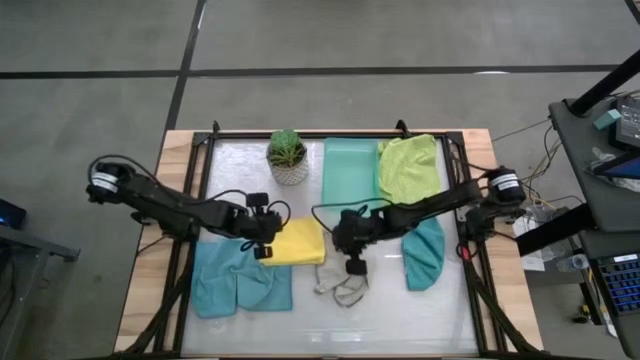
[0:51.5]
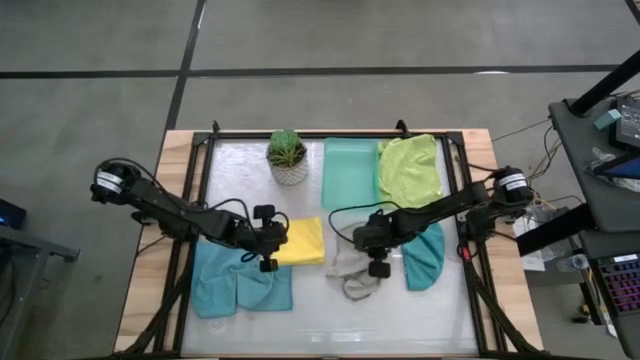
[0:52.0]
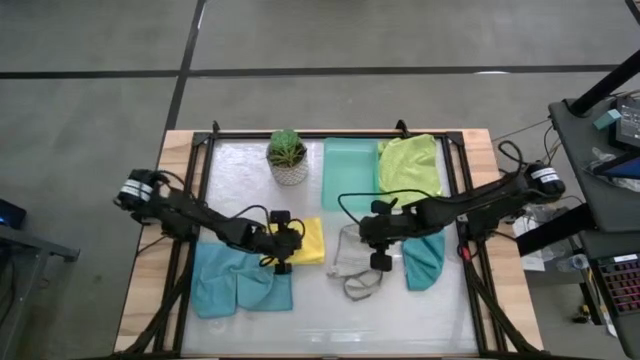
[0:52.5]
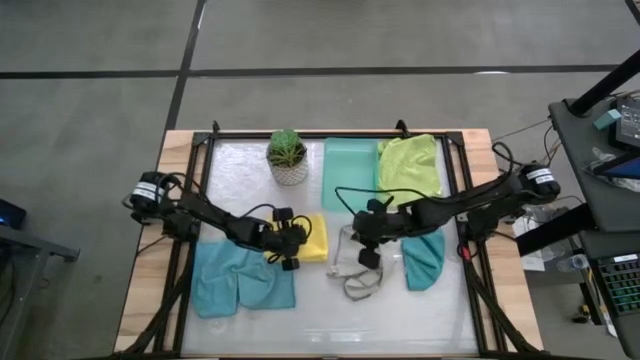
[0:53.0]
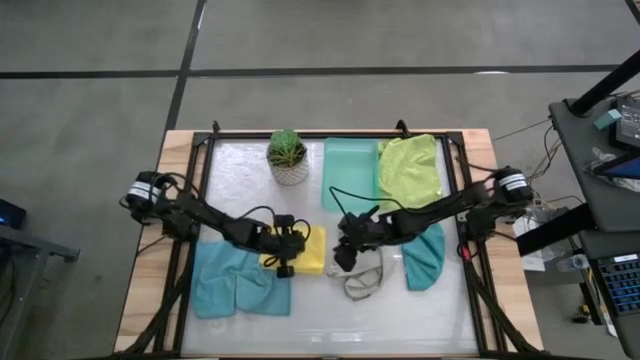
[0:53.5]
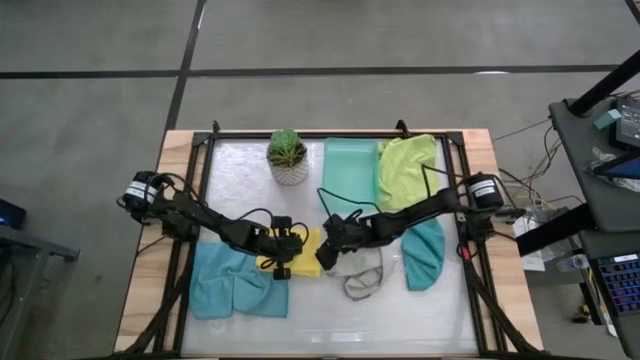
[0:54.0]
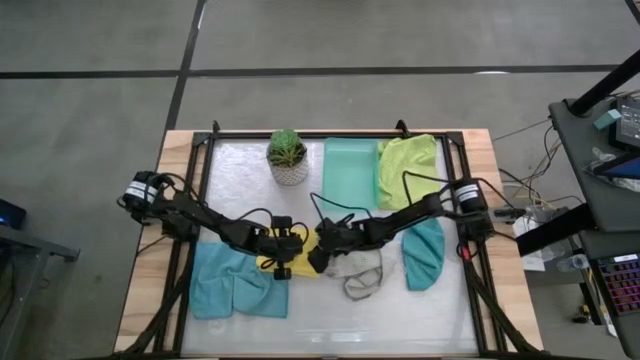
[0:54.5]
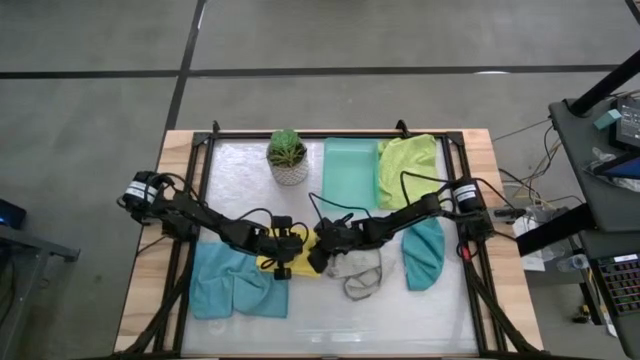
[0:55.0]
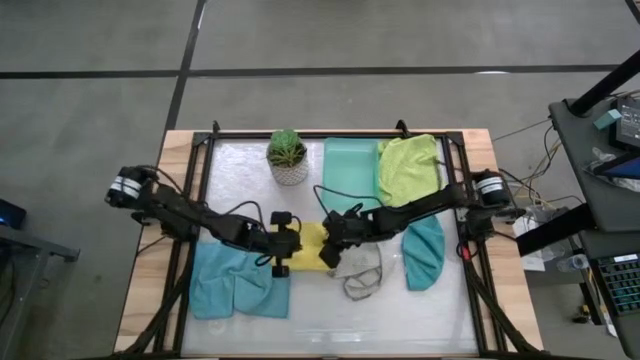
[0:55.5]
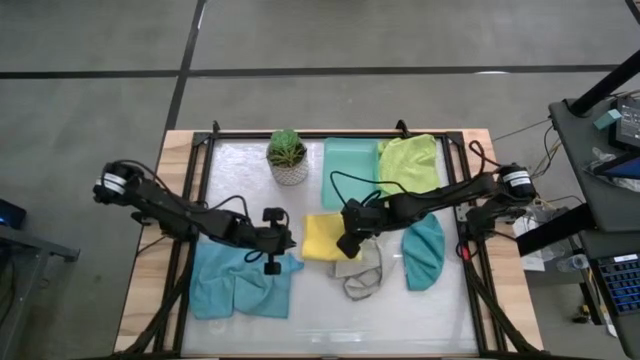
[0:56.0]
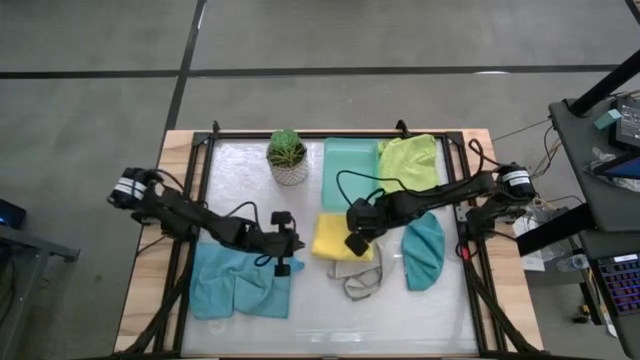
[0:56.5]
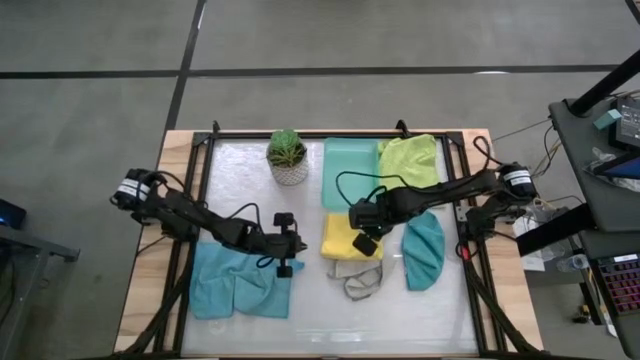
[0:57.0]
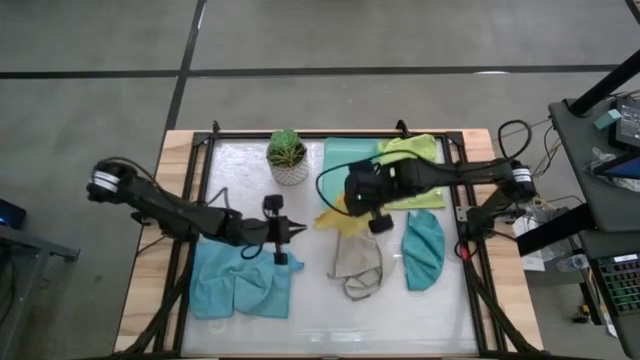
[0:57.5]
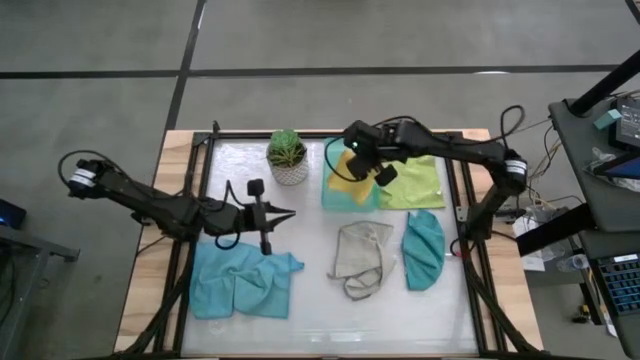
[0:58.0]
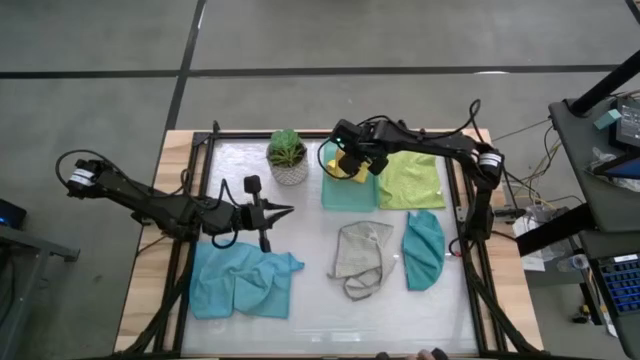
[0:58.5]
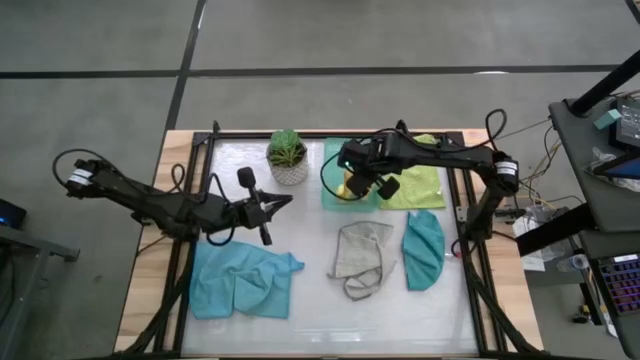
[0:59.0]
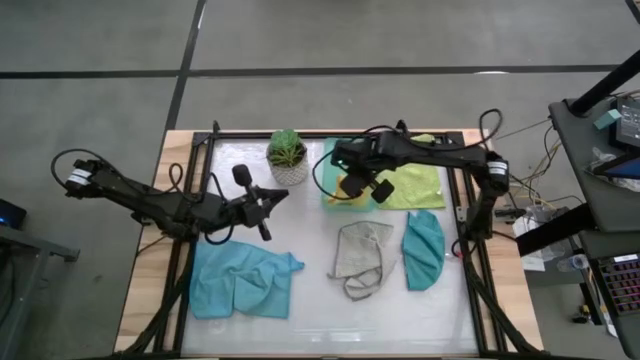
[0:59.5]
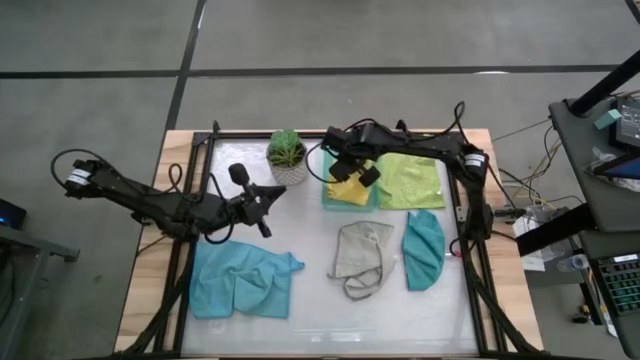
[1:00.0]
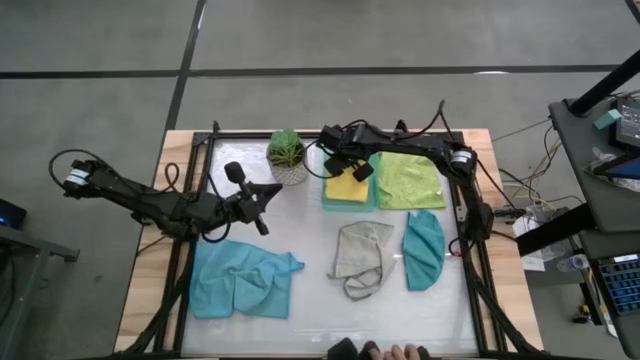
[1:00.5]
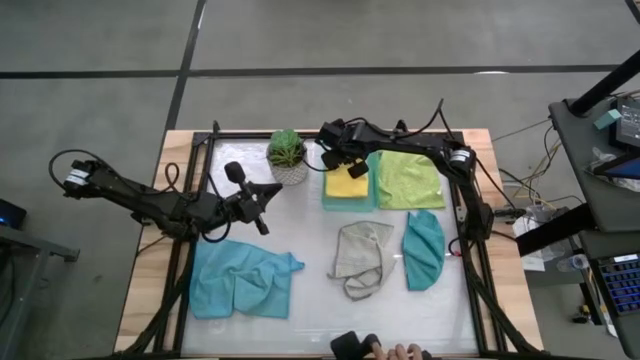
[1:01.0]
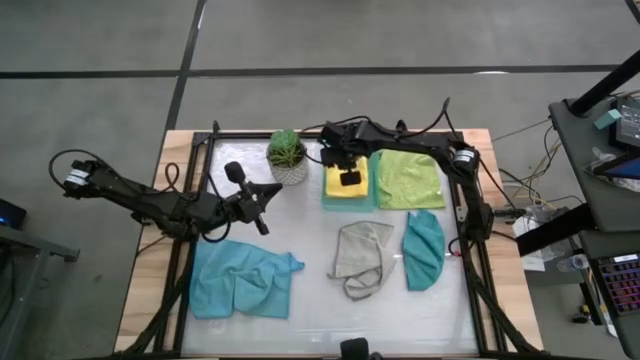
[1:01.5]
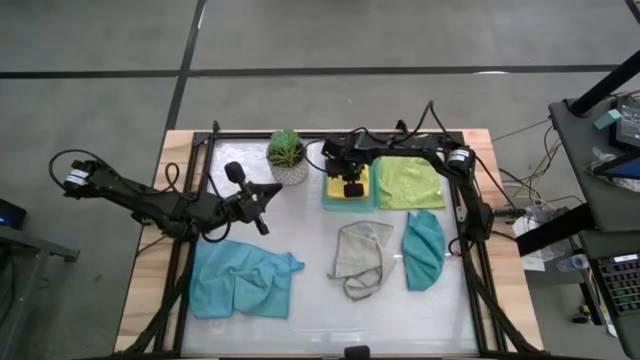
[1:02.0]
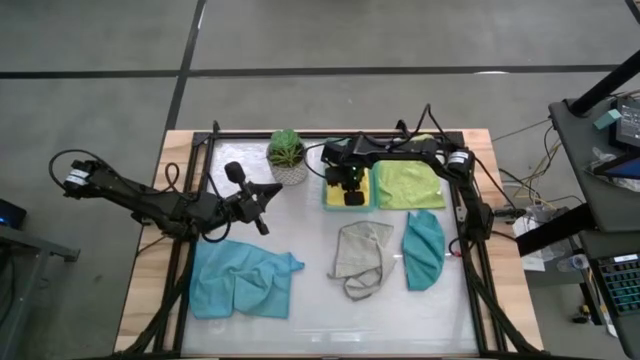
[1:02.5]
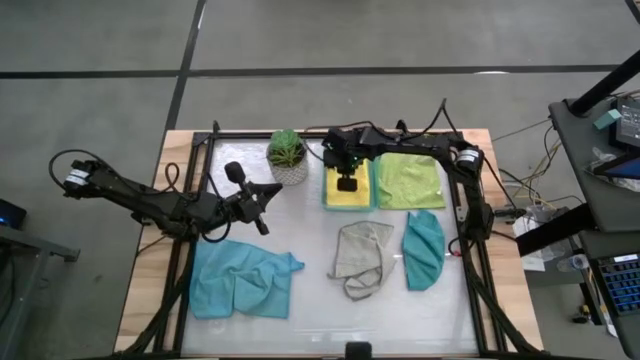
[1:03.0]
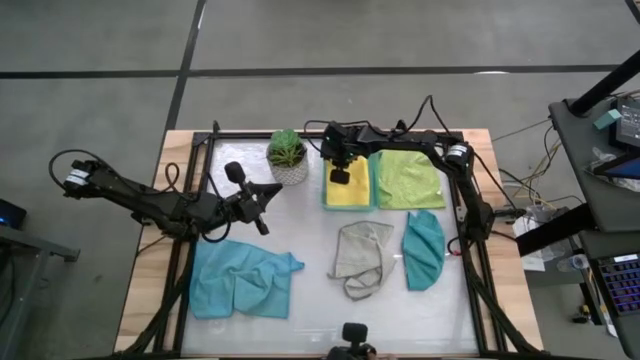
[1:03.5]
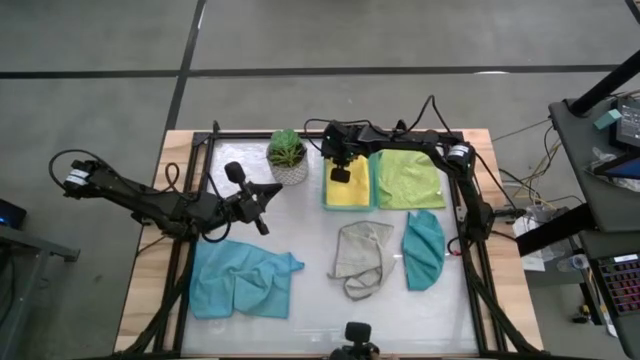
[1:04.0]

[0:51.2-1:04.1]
Task: Fold microfiber towels
Put the folded yellow microfiber cloth into the blue bin

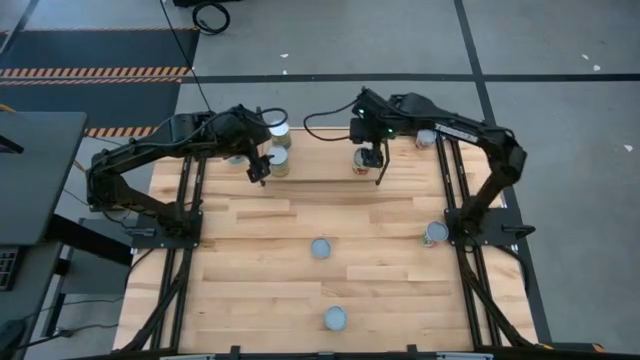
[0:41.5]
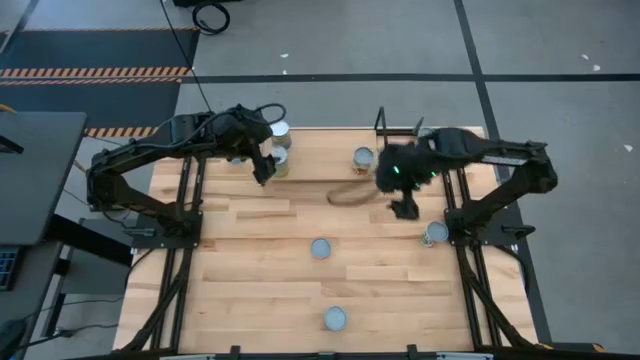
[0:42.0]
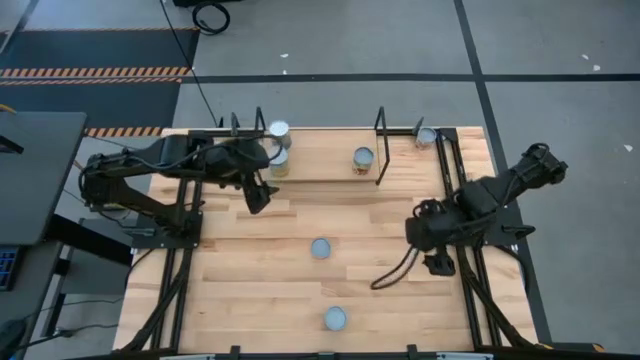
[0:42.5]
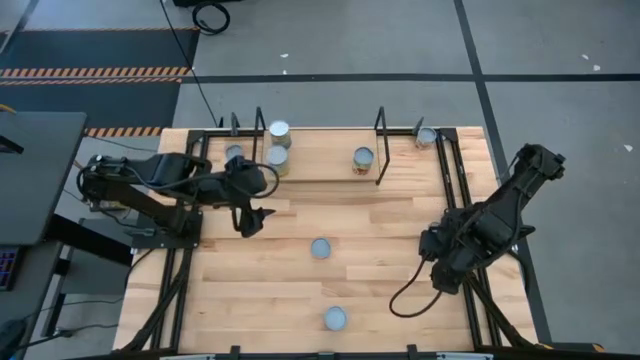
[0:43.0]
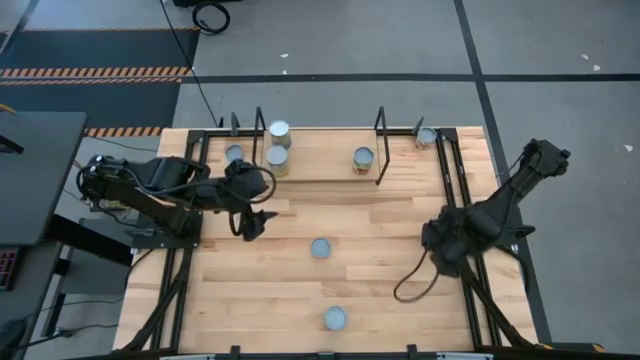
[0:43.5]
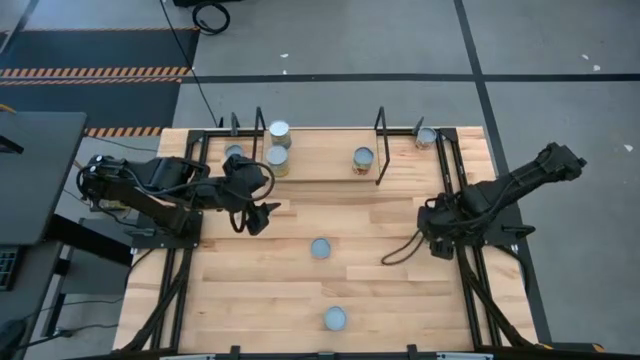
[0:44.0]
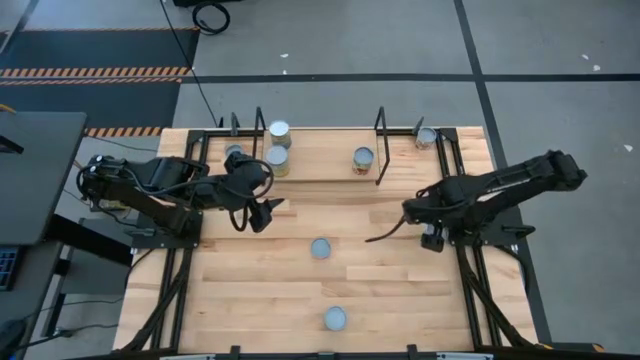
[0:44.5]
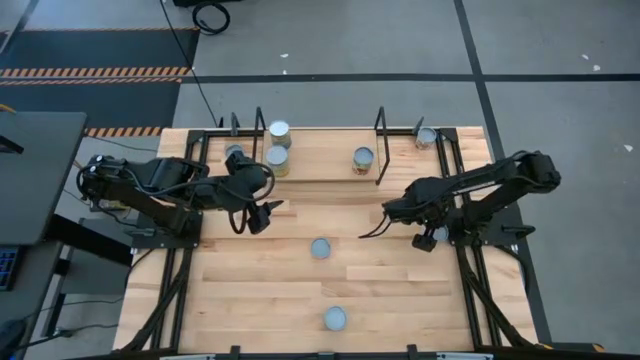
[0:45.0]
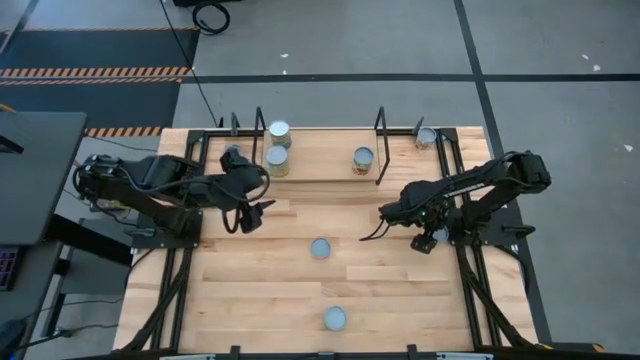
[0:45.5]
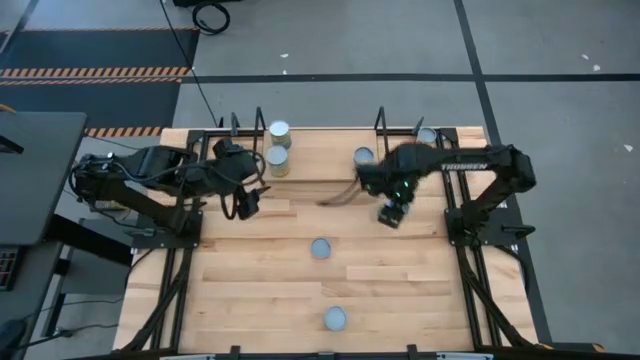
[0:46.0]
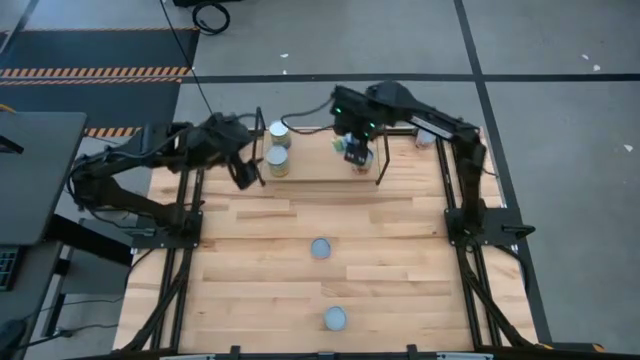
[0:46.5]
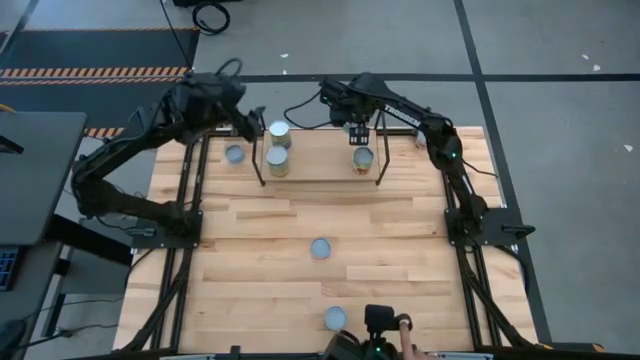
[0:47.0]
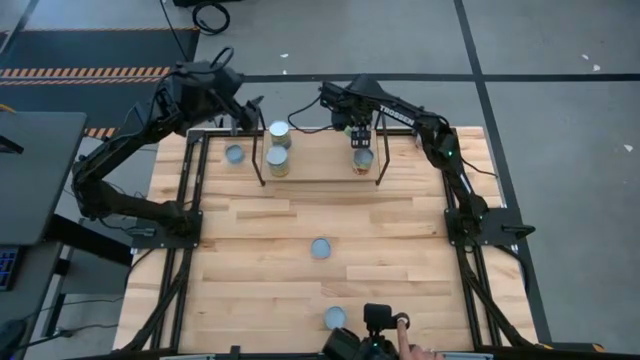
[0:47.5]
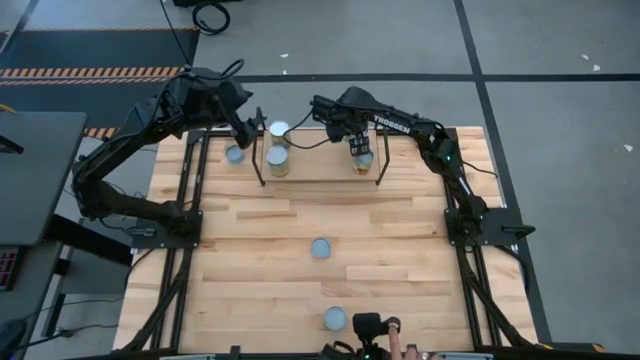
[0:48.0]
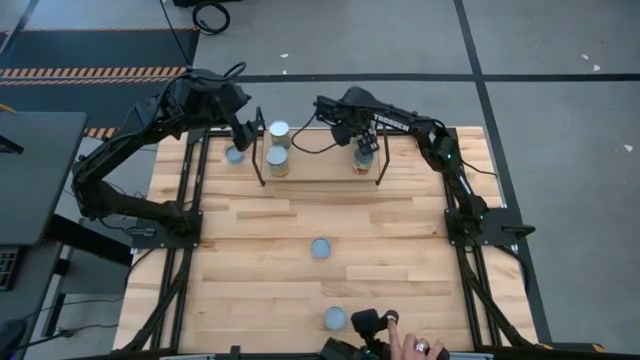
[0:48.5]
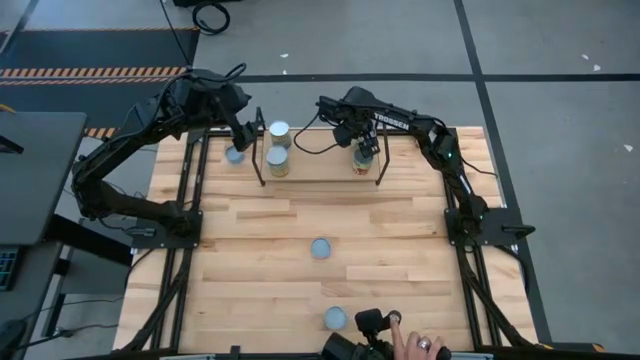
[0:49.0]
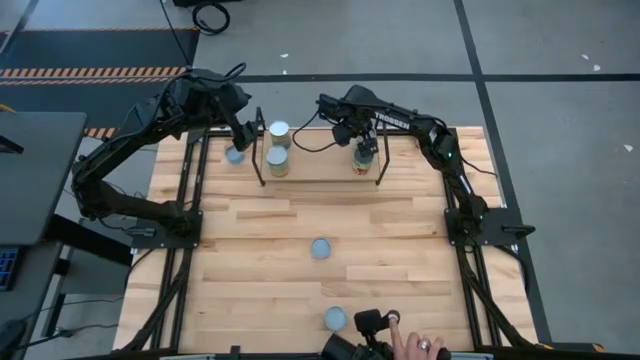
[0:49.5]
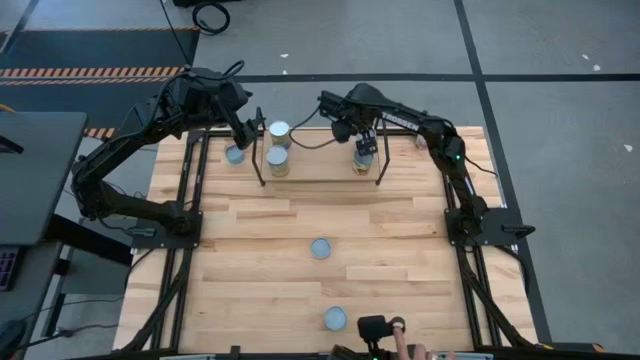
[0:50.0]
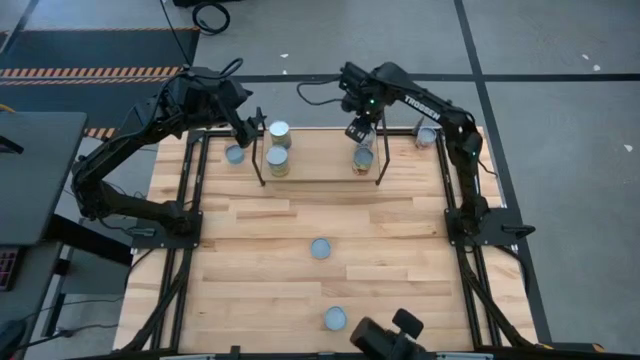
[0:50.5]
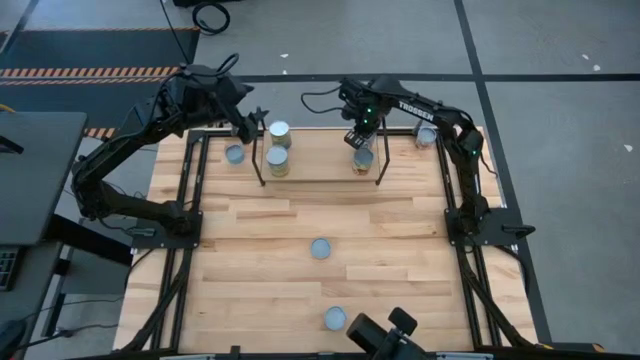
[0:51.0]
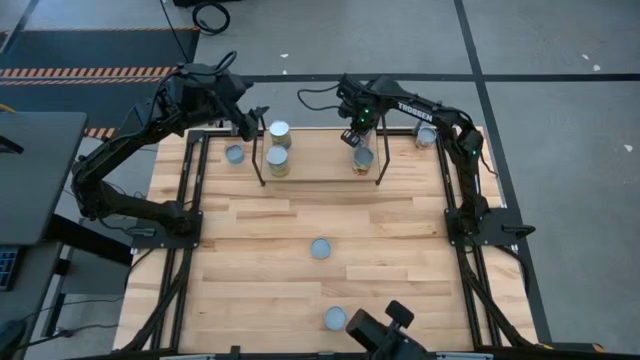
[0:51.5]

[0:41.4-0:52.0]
Task: Pick and place cans onto a shelf
Put the white can on the shelf aligned with the light green can
